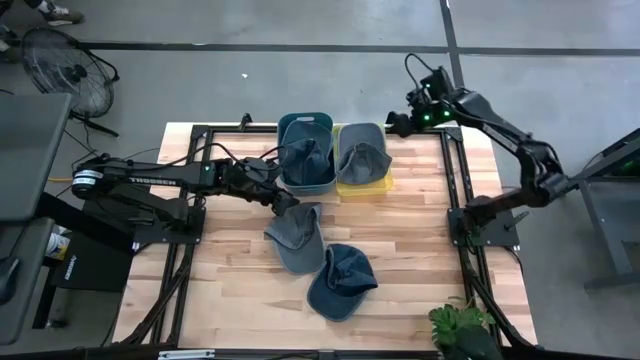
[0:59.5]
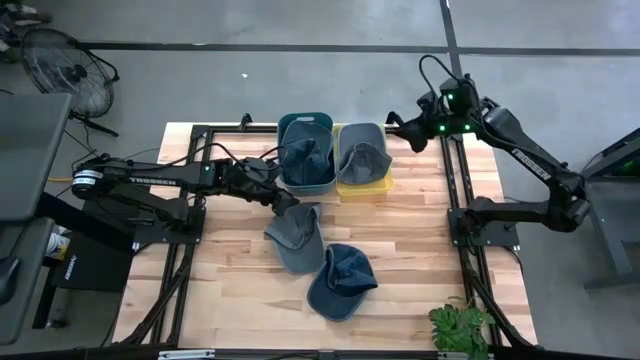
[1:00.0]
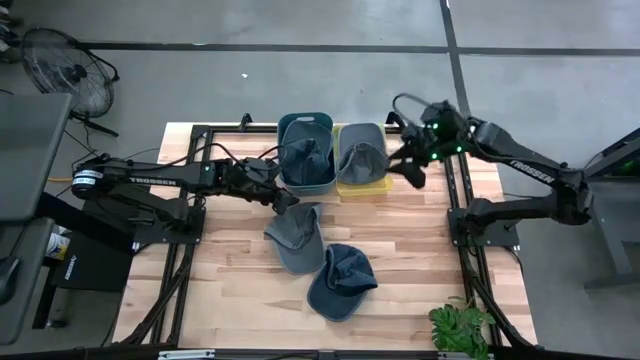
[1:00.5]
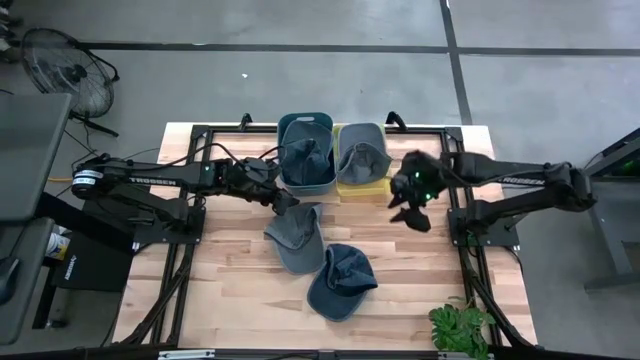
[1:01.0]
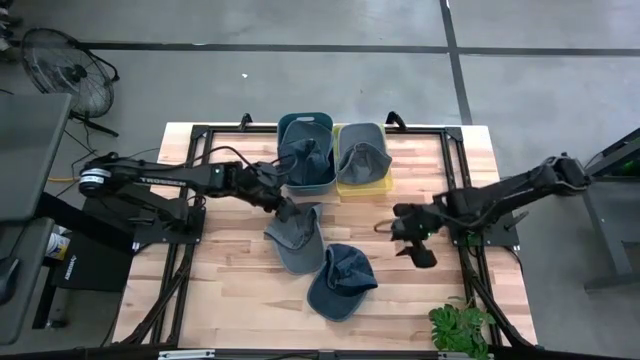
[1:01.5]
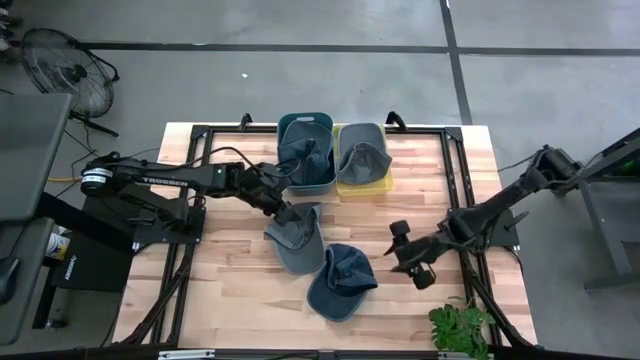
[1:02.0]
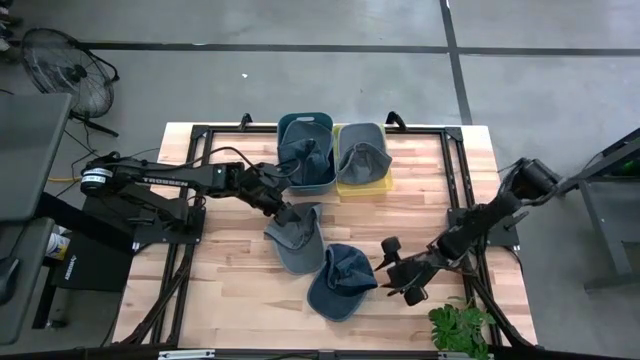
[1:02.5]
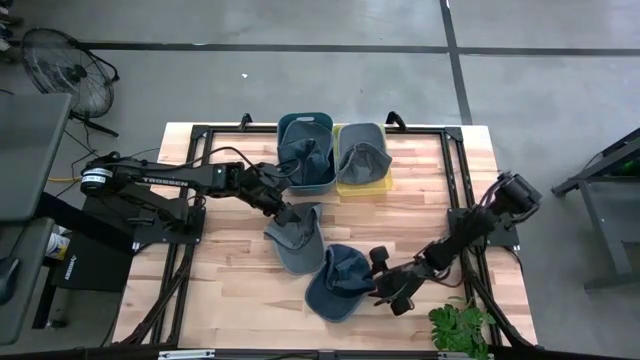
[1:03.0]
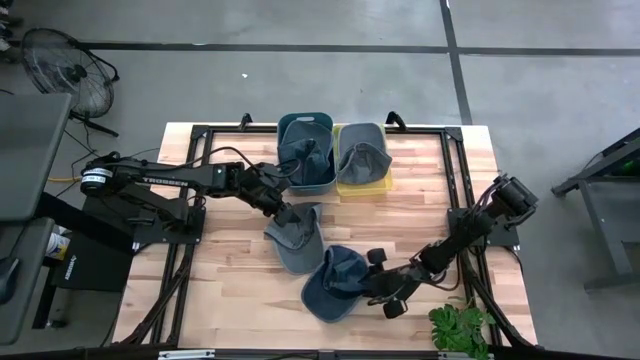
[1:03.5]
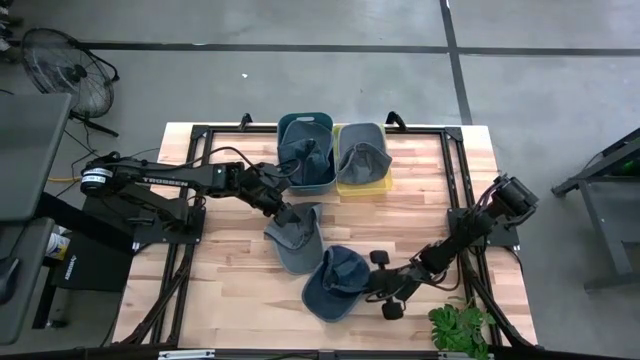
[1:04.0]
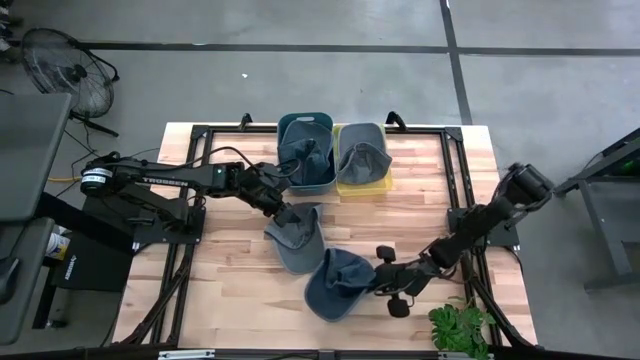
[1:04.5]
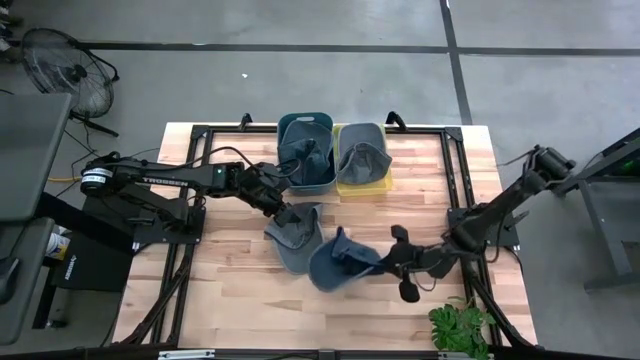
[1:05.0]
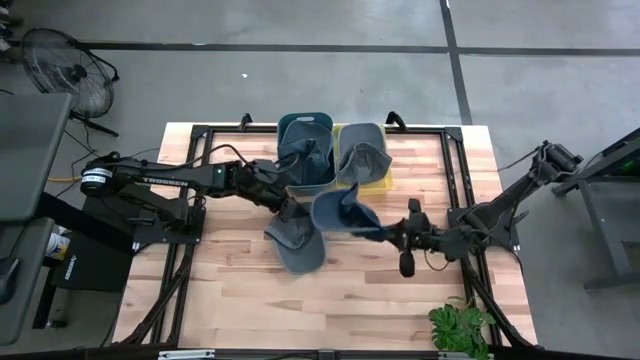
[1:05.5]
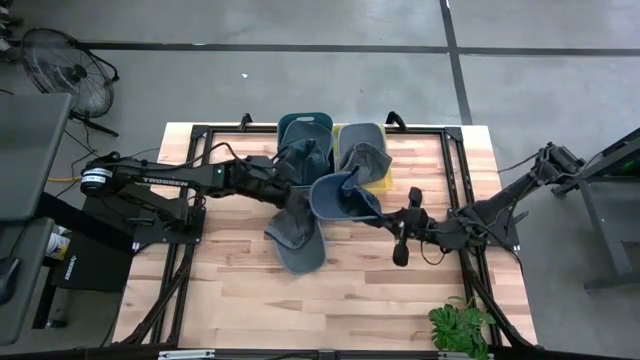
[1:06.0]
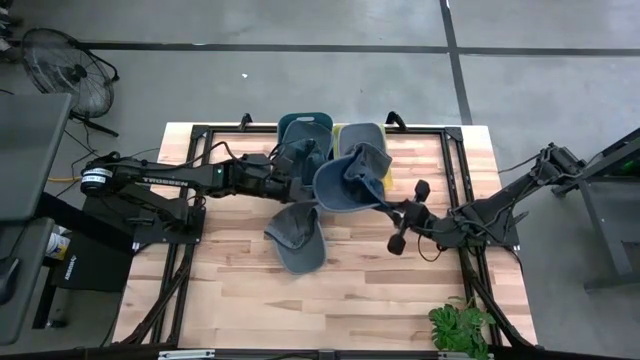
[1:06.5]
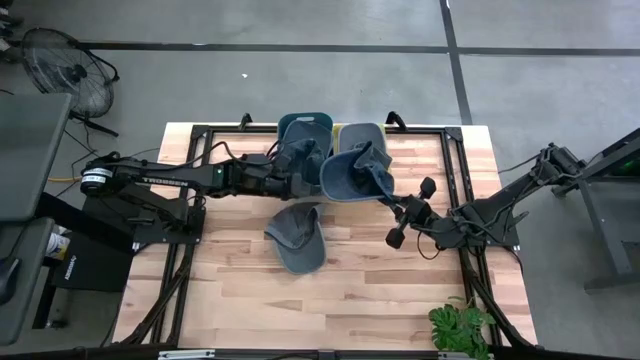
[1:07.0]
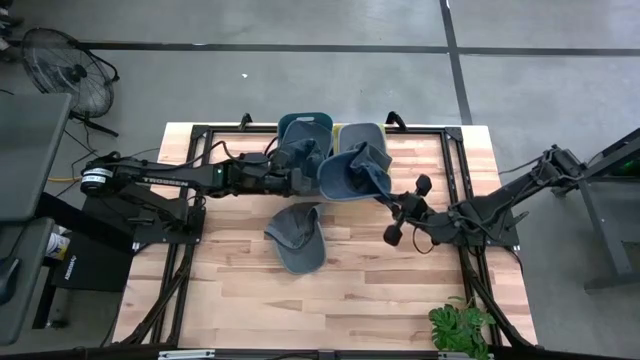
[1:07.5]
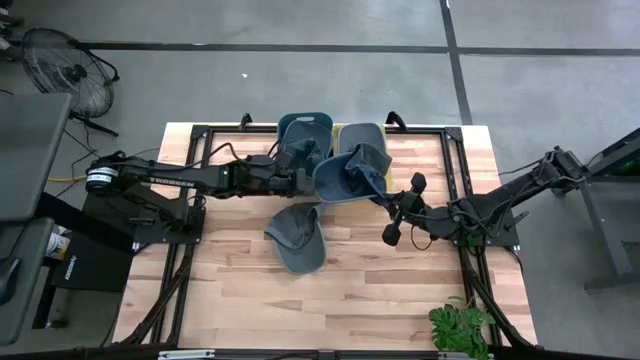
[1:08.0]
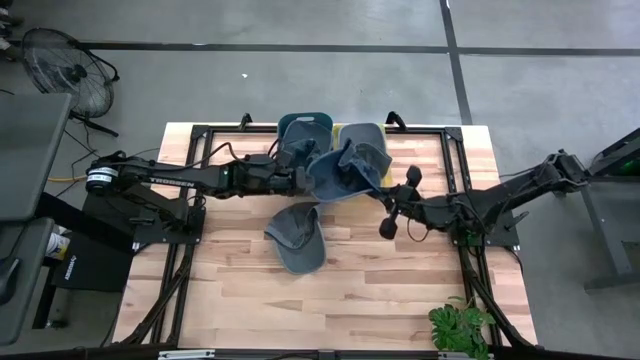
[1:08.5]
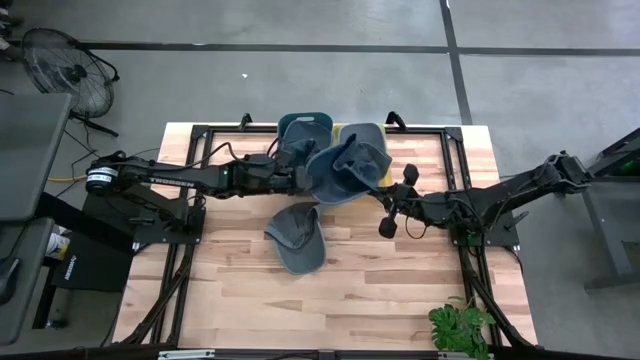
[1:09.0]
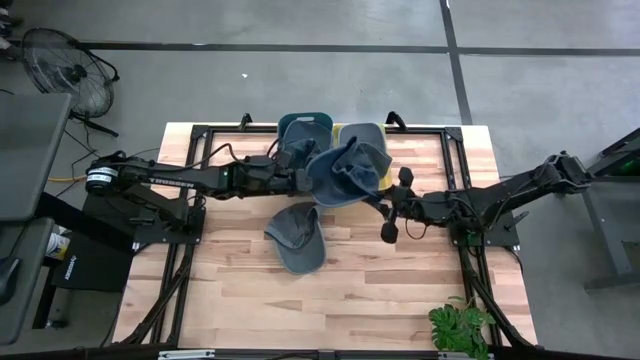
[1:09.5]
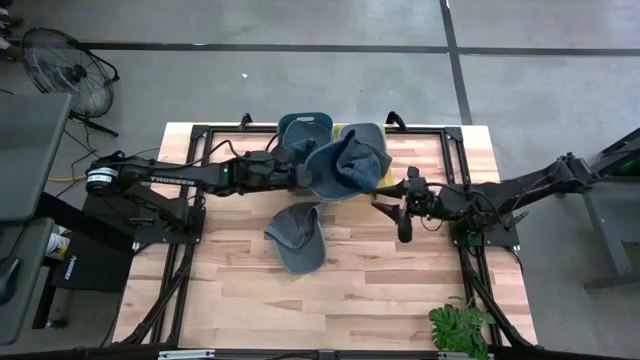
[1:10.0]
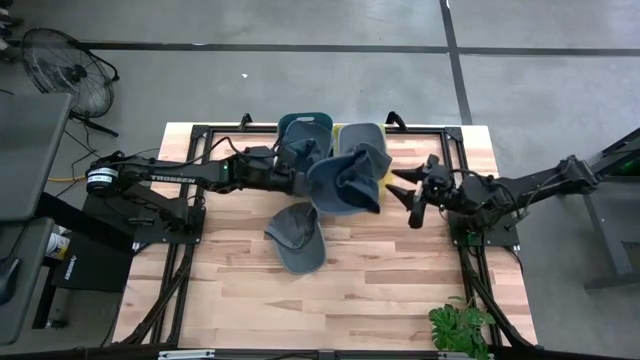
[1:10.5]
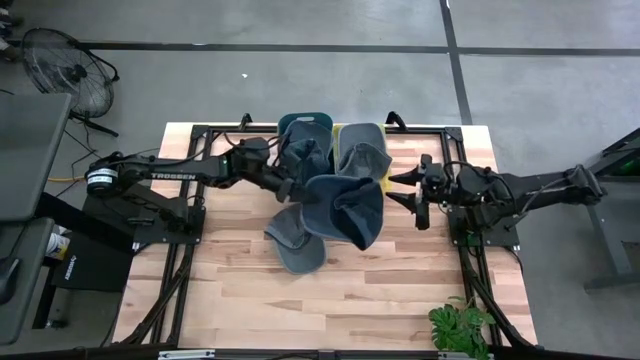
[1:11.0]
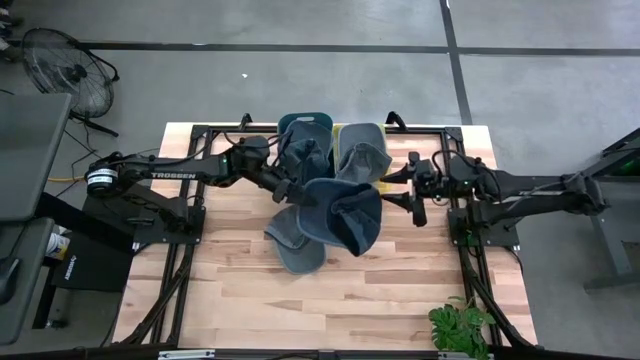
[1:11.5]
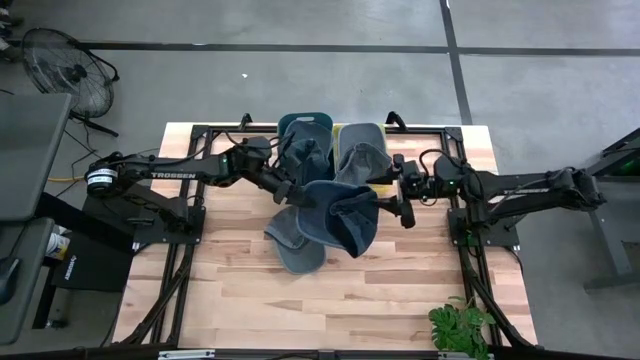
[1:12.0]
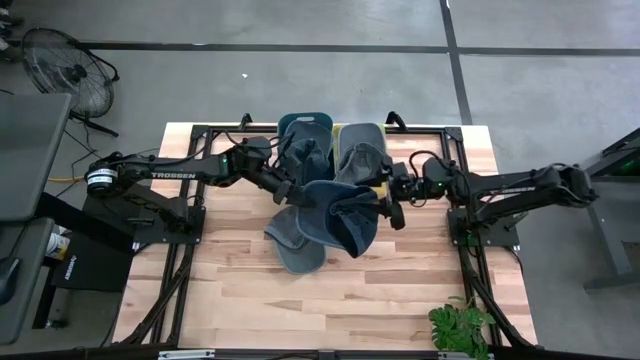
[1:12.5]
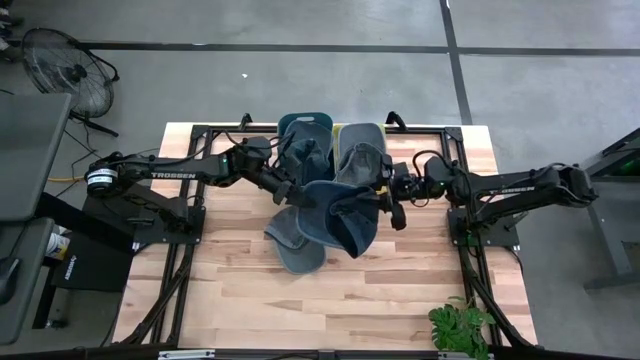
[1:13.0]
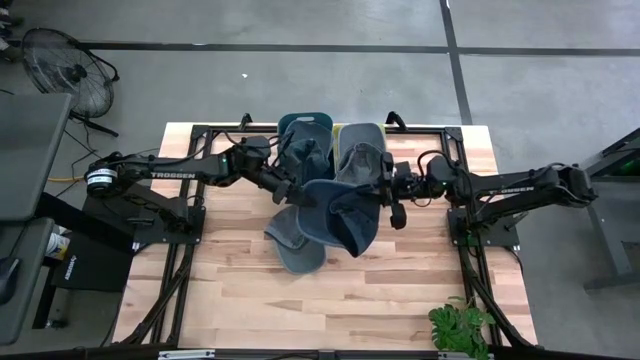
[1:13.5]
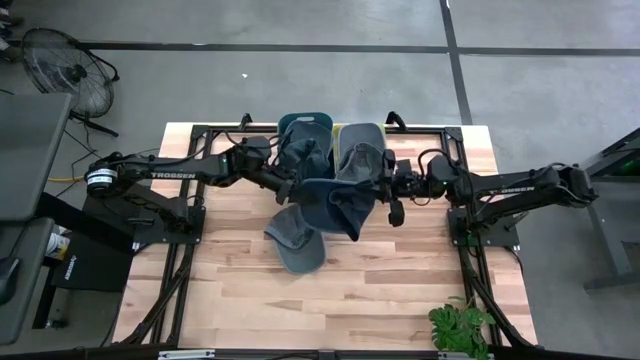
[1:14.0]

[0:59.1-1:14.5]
Task: Pick & Place hat
Put the blue cap into the blue bin
